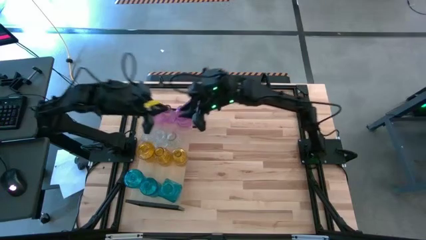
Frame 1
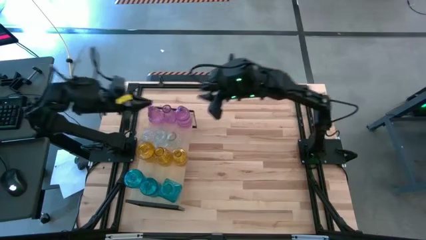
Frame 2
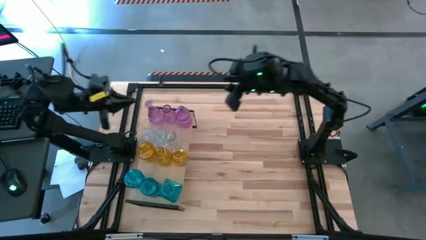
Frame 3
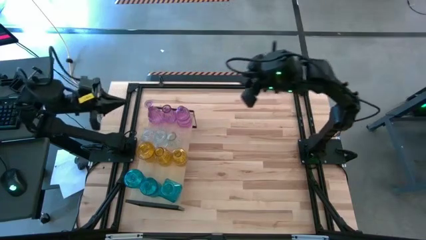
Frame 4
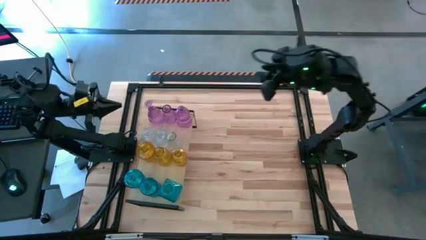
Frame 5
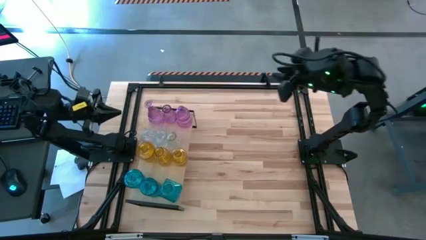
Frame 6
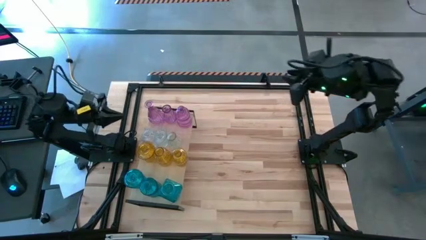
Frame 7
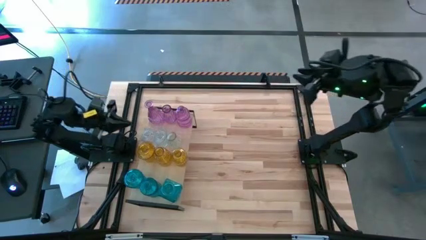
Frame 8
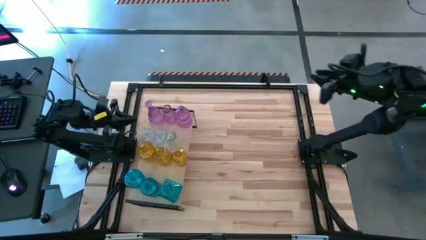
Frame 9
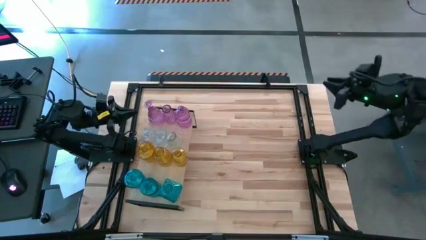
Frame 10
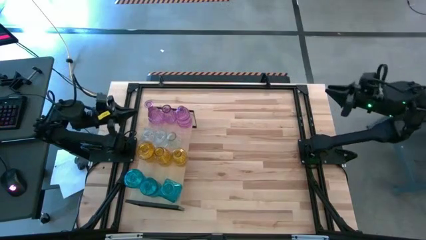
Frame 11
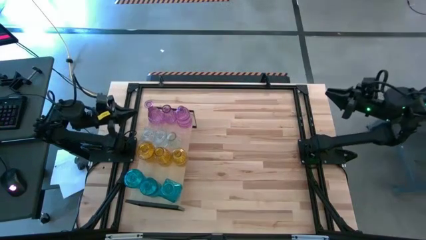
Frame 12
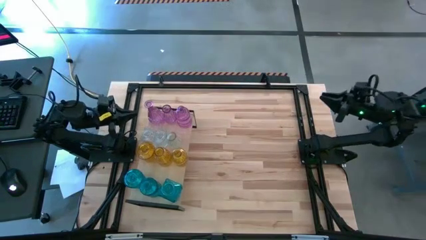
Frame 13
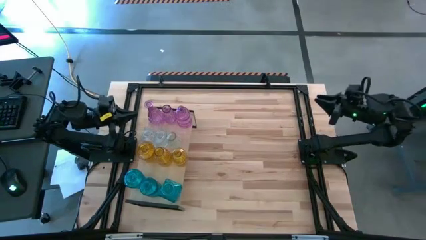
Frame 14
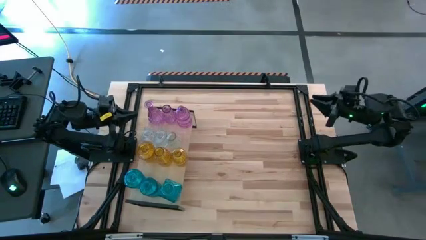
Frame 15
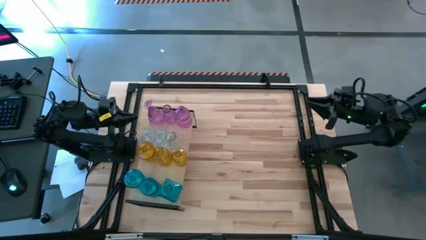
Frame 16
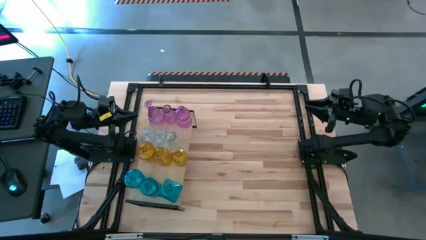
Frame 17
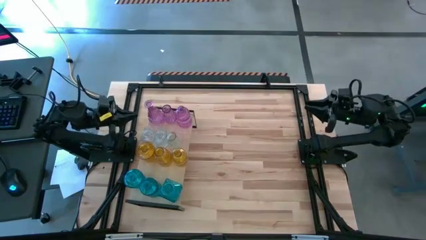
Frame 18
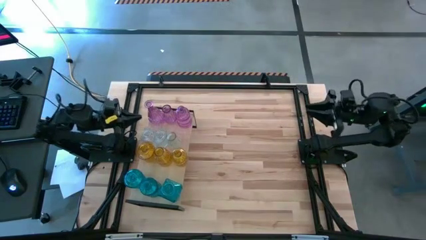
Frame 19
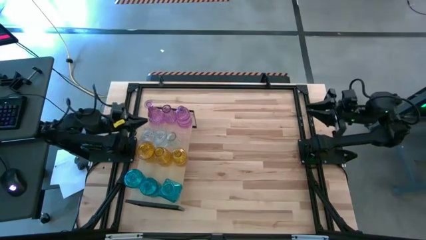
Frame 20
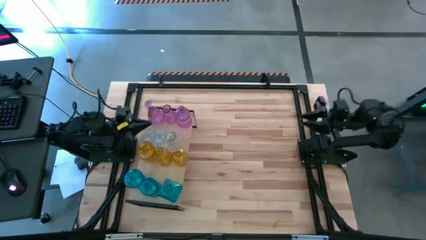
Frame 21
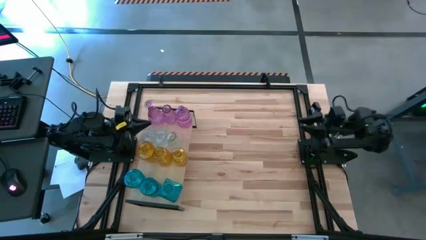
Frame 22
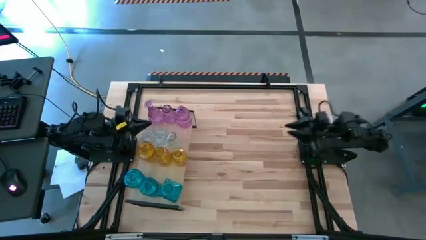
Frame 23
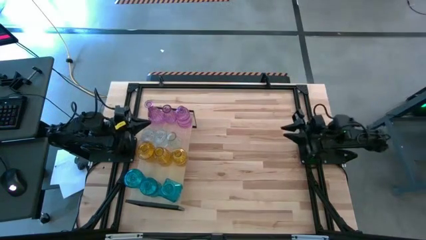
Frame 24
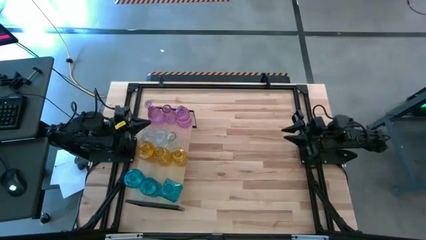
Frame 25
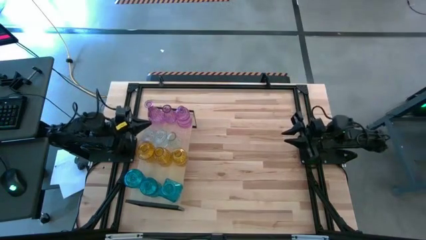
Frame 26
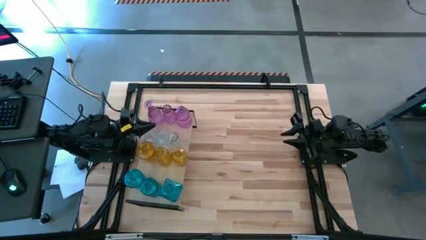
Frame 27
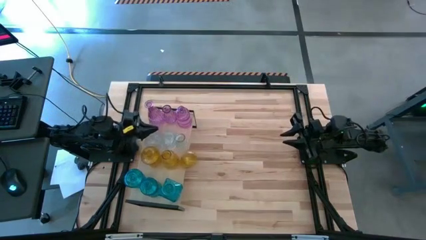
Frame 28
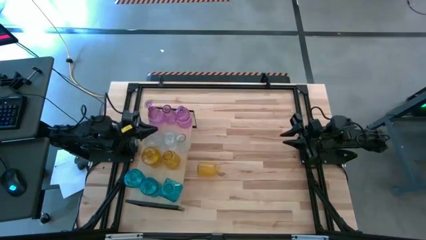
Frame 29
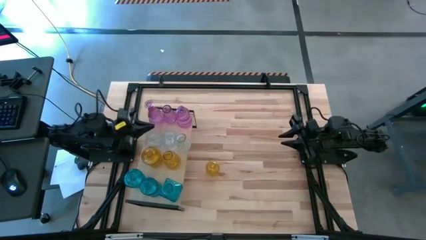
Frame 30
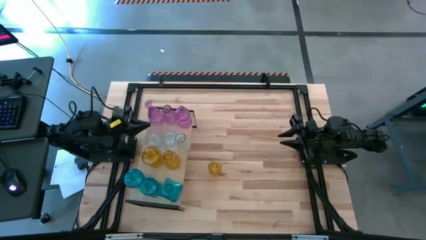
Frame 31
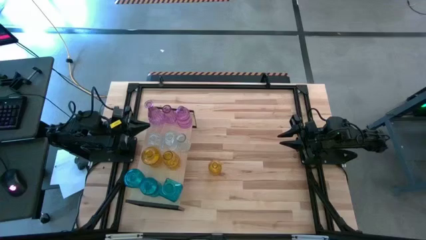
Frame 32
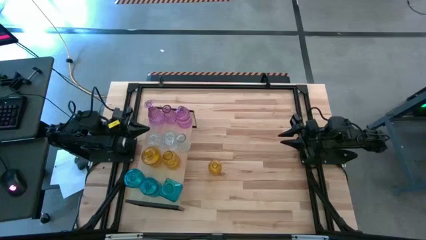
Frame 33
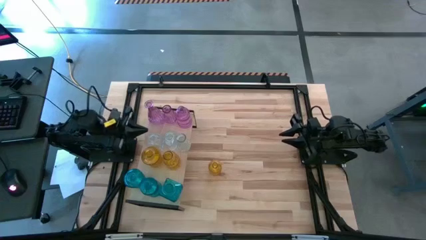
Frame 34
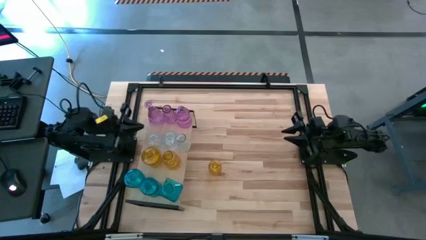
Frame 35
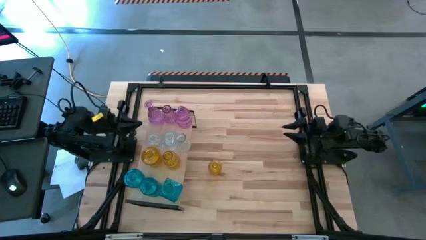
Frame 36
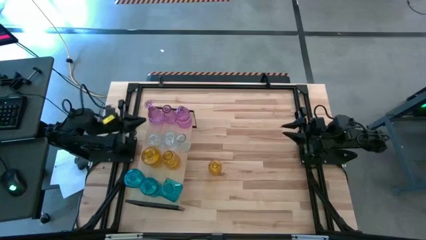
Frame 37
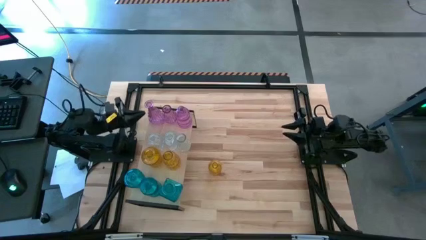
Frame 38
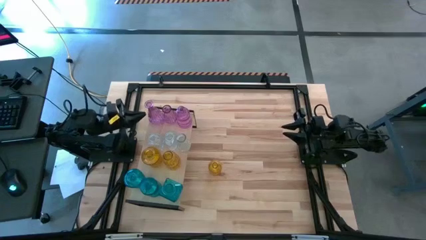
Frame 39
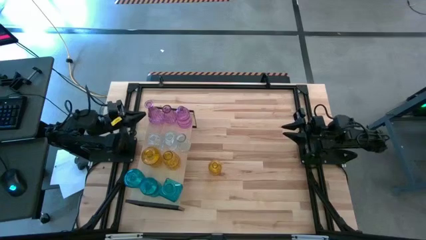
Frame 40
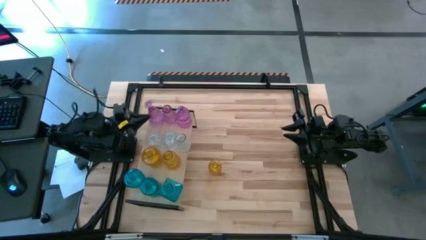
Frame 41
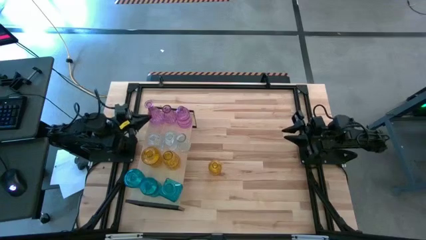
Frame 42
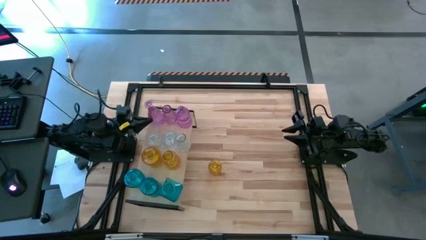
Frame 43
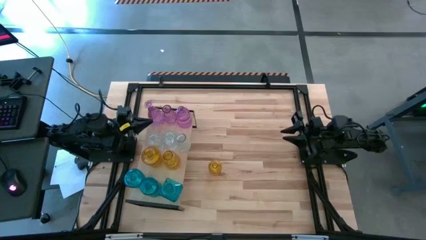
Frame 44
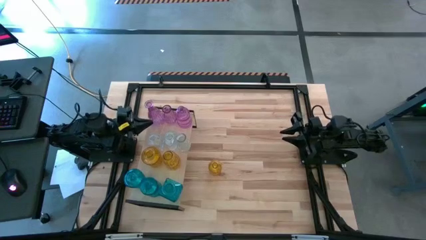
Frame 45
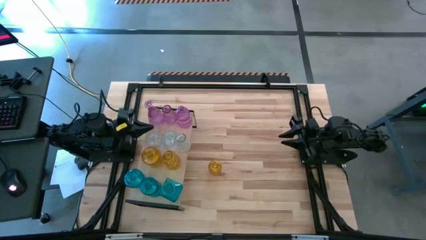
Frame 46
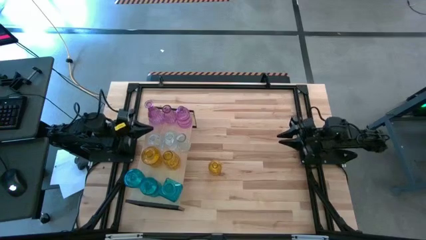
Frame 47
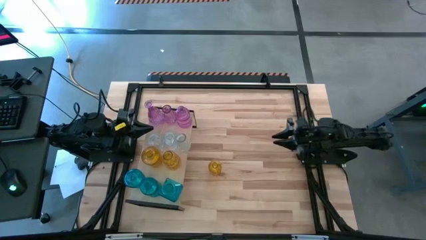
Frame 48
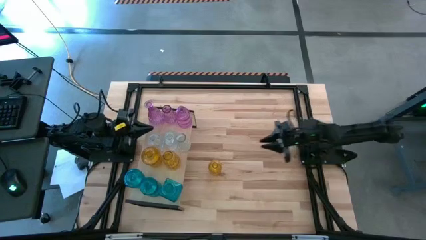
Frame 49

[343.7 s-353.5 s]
Task: sort vases onto shelf
Adjust the blue flower vase on the shelf

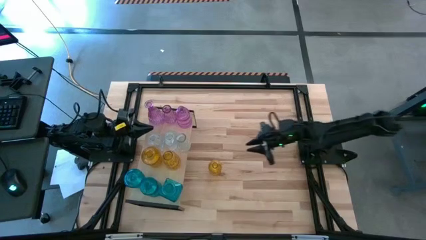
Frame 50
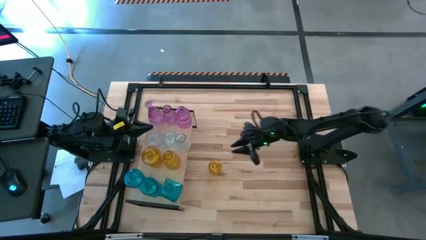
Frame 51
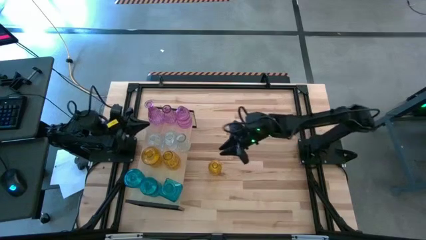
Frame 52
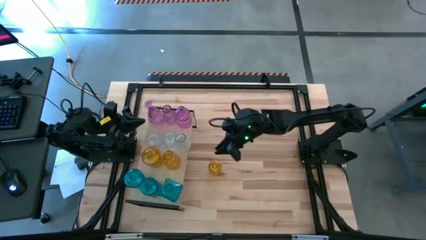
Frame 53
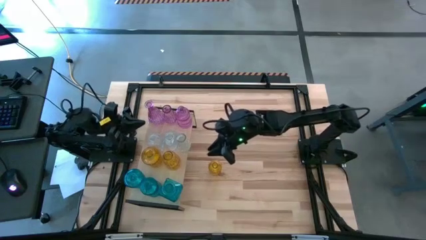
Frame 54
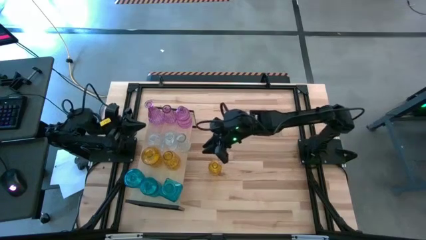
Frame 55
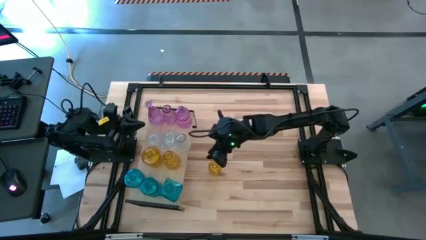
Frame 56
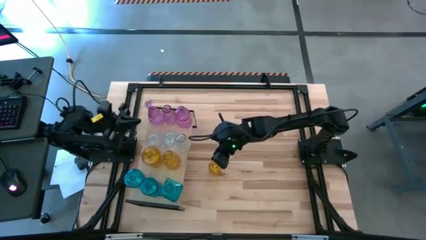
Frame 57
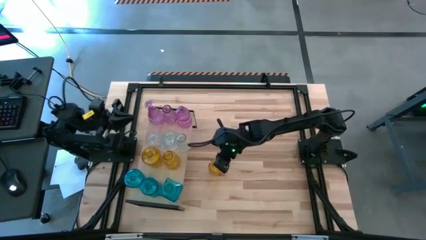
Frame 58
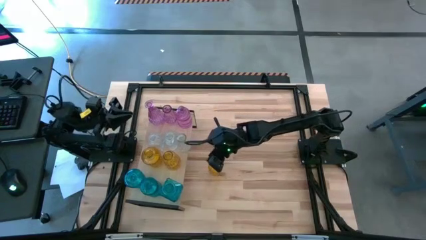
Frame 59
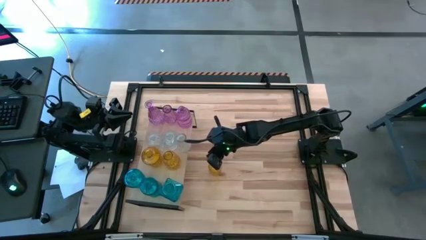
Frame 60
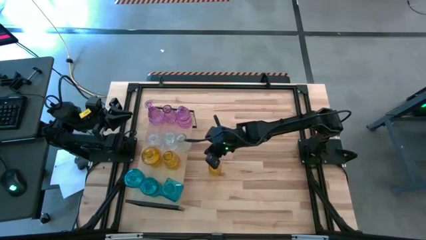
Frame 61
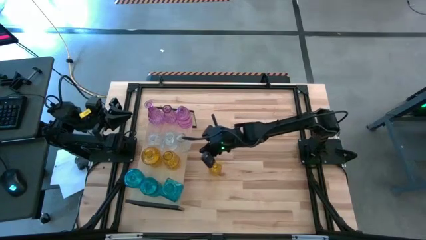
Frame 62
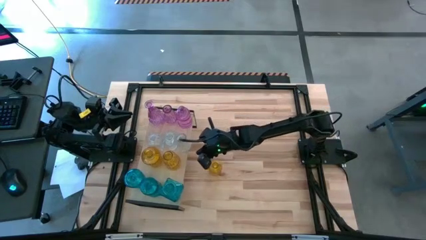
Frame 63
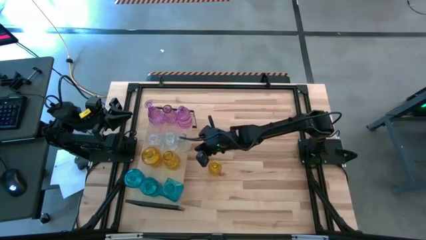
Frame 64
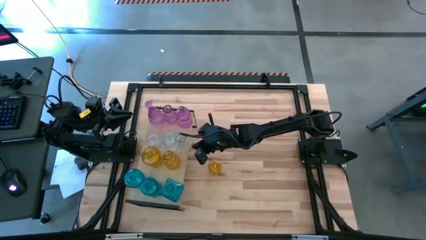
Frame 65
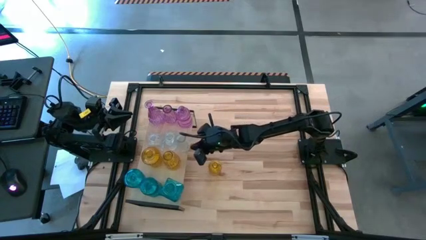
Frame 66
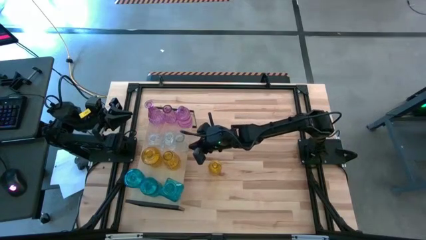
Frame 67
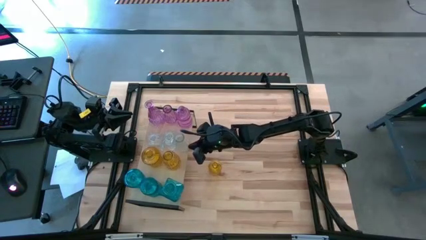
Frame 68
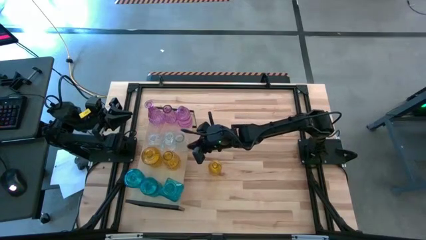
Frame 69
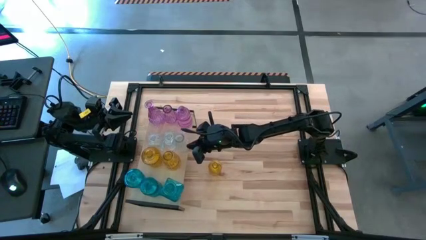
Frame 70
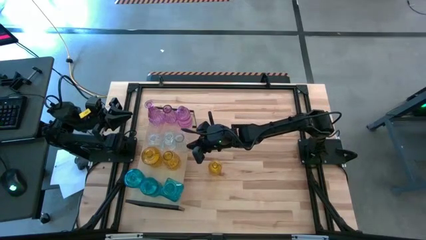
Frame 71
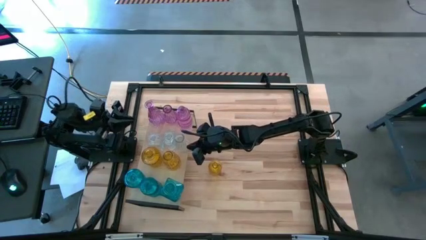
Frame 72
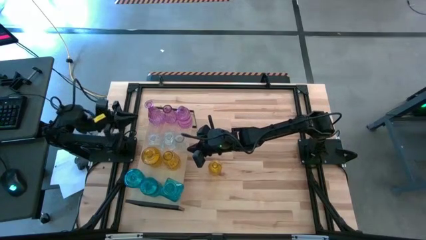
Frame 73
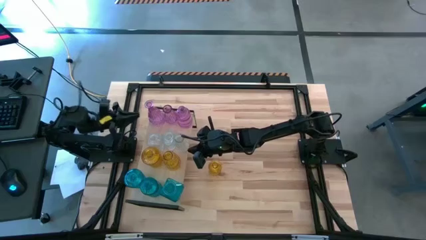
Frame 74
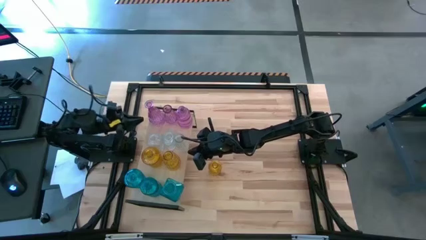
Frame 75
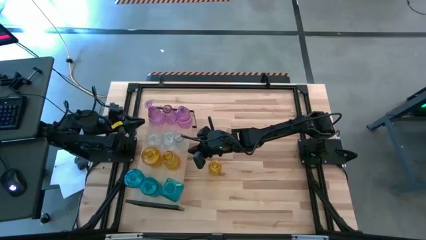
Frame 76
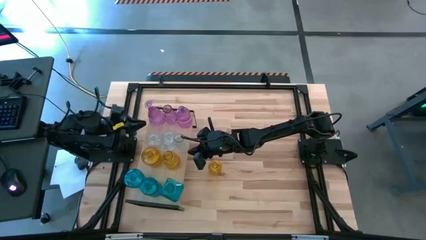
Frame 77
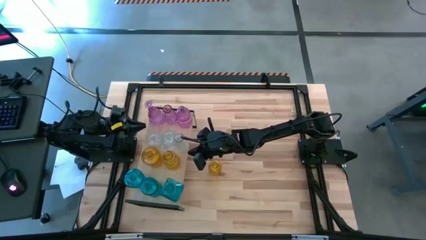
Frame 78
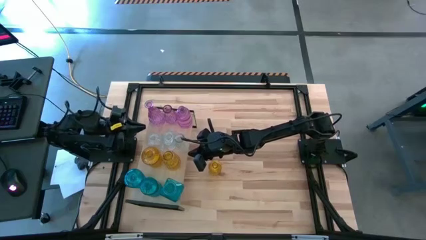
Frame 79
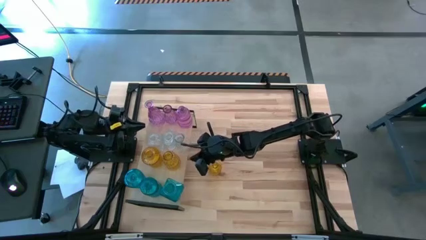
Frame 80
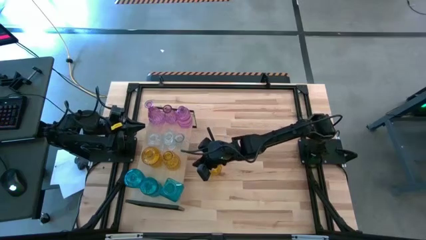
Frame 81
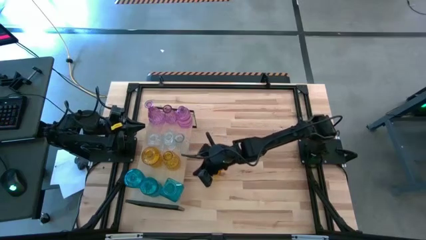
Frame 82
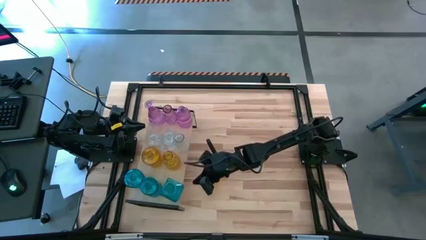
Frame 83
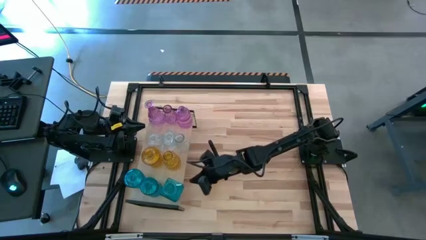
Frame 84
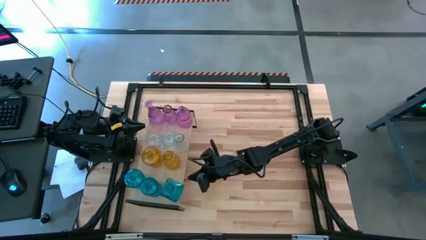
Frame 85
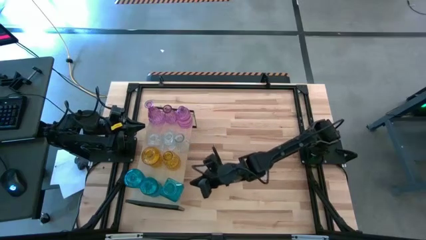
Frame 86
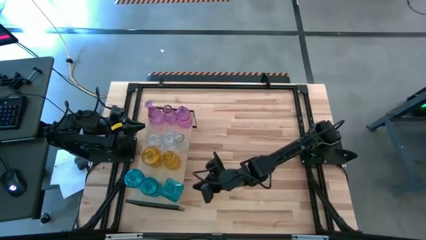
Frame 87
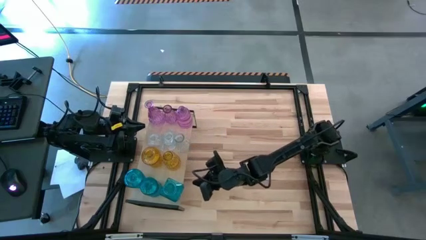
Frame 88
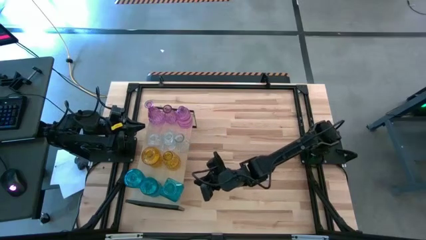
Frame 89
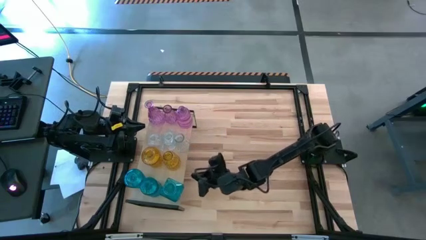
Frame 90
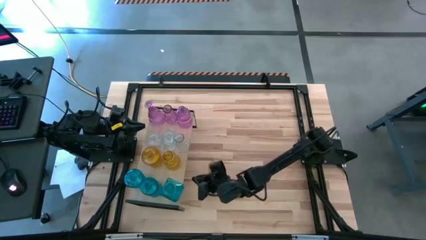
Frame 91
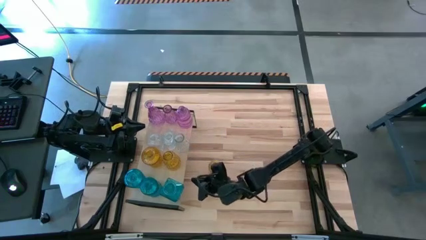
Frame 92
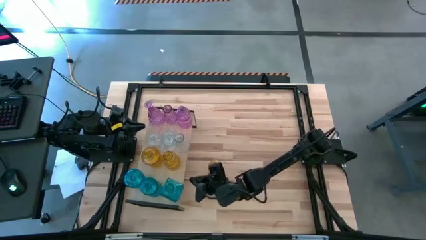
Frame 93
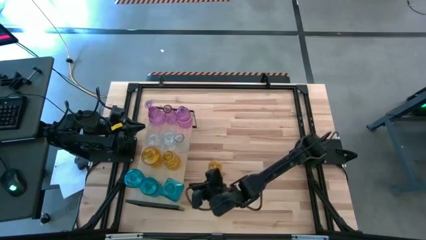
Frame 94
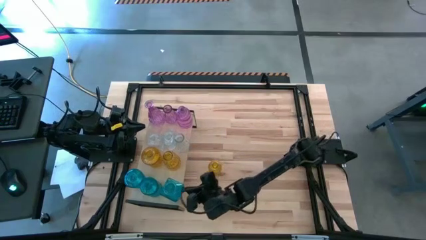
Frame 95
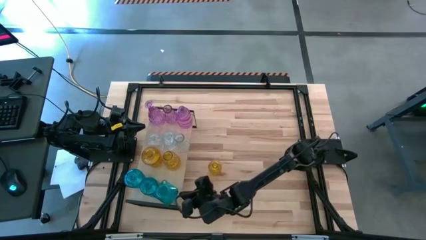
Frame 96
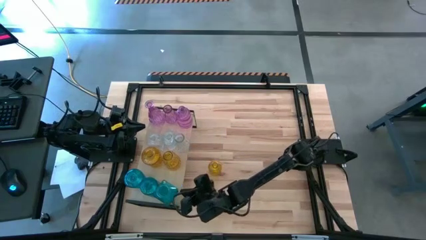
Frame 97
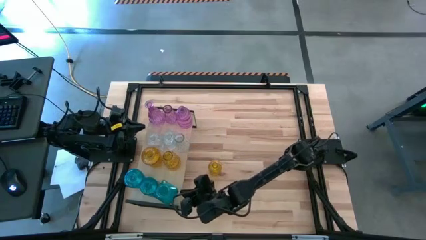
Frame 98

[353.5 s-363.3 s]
Adjust the blue flower vase on the shelf
